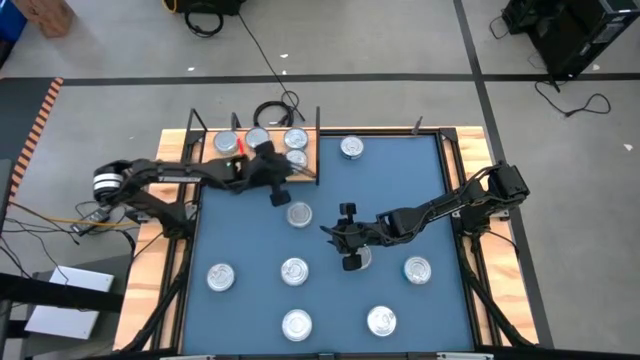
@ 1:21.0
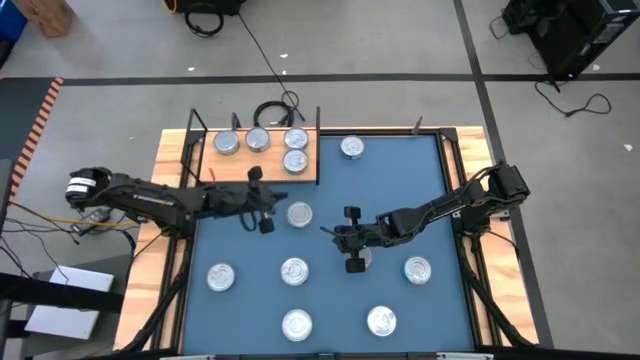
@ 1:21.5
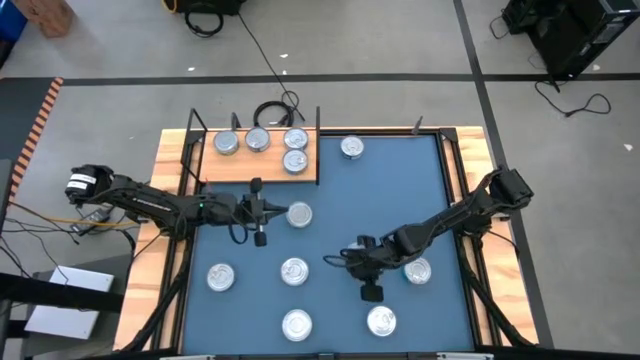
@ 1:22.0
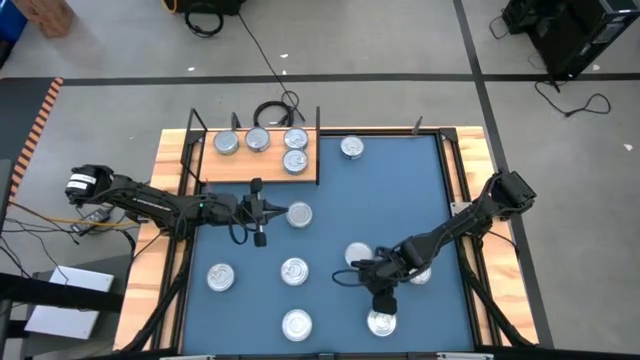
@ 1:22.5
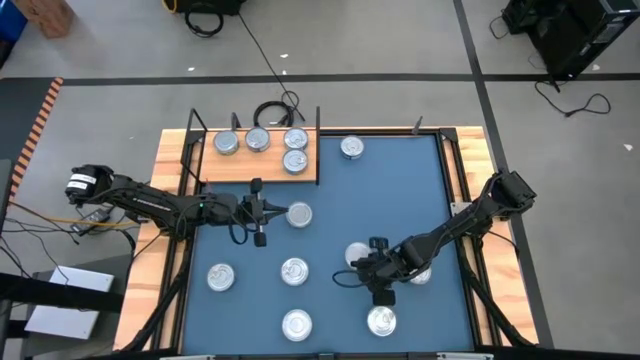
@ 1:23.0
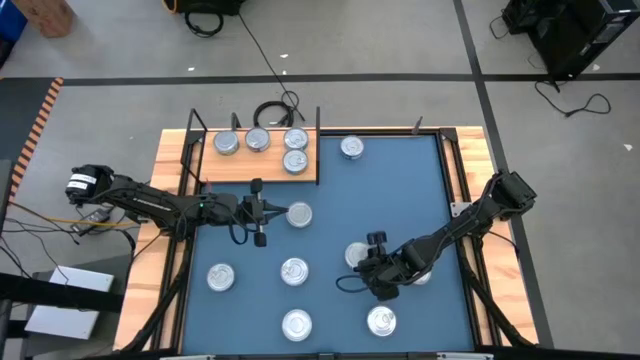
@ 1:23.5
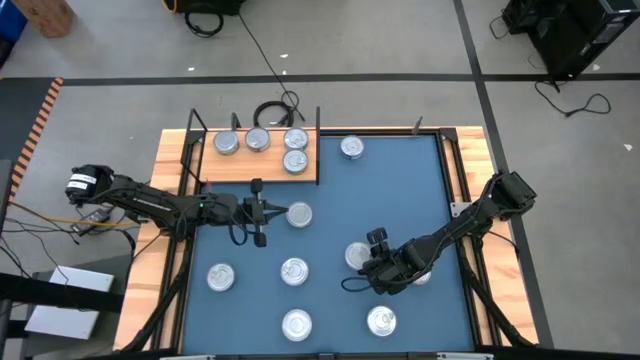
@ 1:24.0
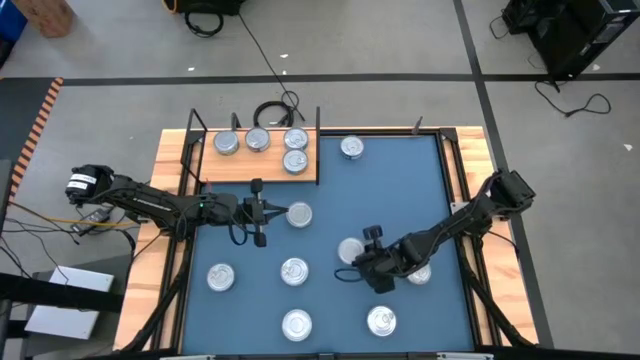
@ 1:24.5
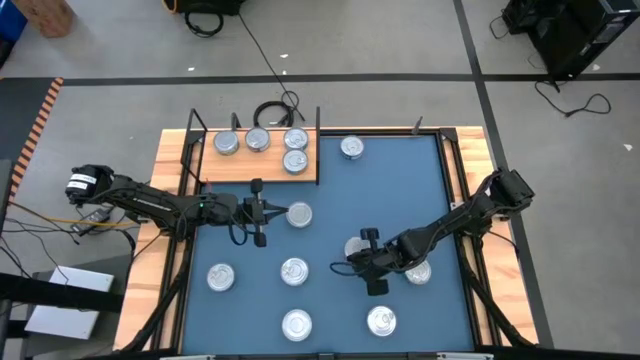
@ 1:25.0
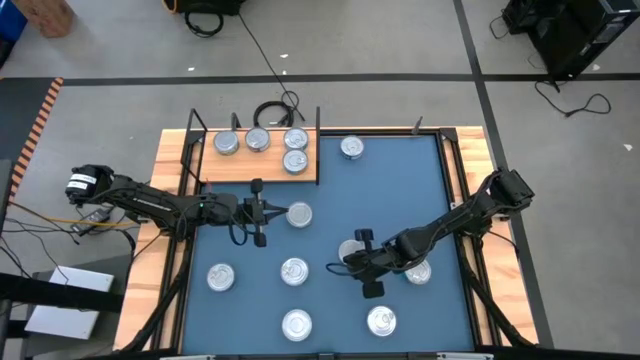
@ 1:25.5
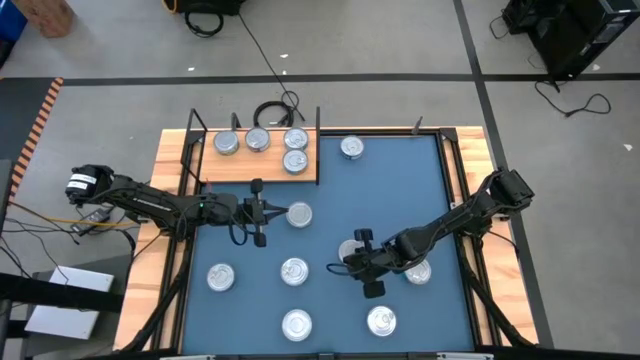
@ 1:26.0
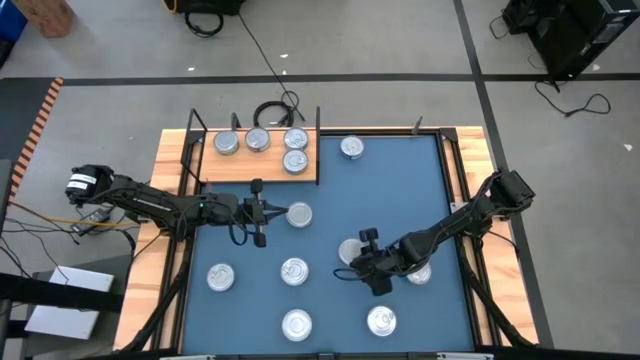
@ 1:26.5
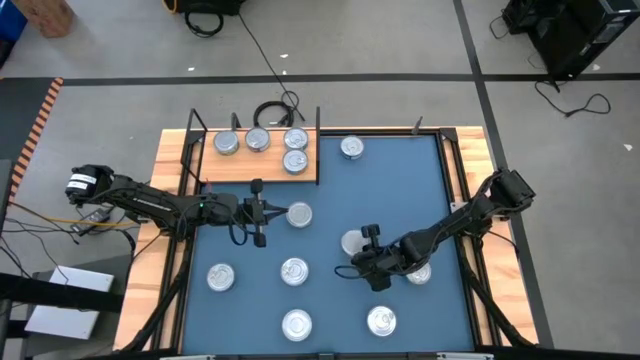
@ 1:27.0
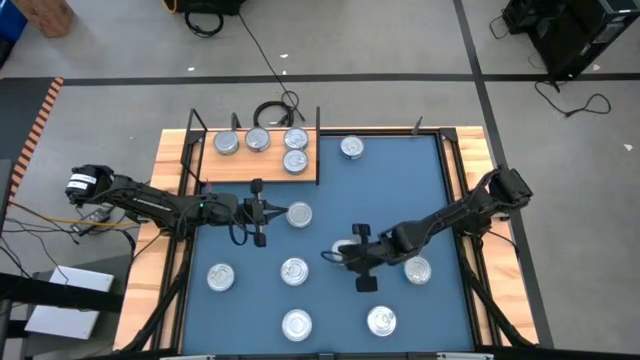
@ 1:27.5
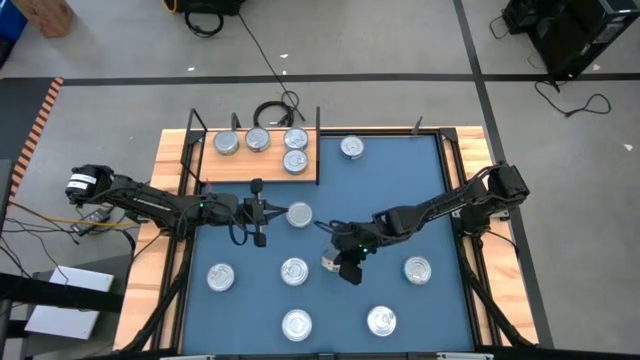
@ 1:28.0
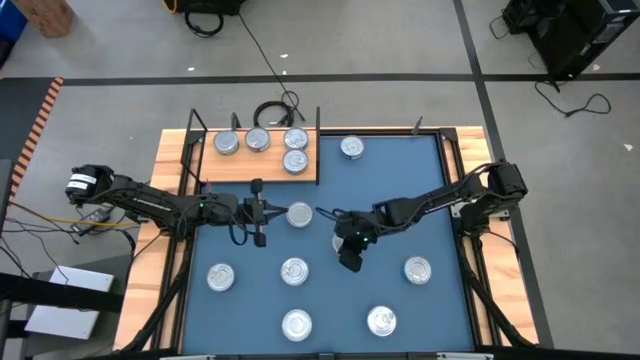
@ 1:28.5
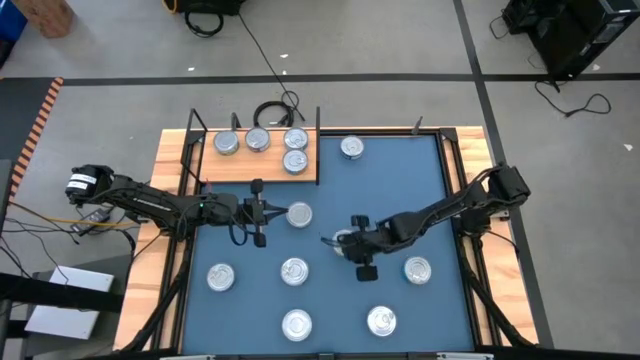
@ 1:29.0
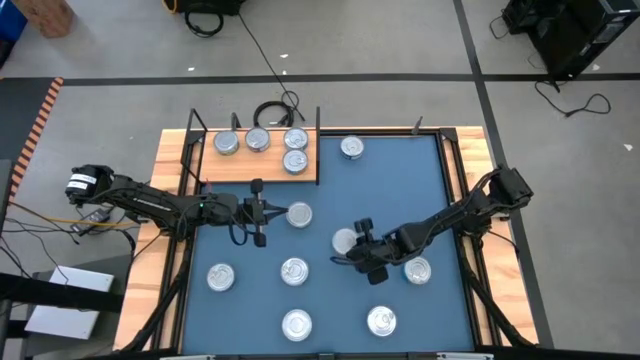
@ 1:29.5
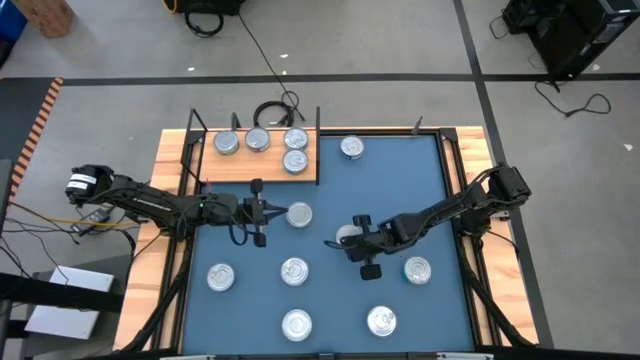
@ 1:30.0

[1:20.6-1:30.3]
Task: Stack canned seafood by type on shelf
Stack the green tuna can on top of the green tuna can on the shelf
